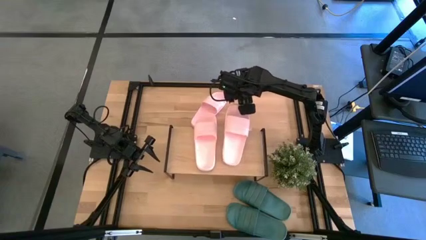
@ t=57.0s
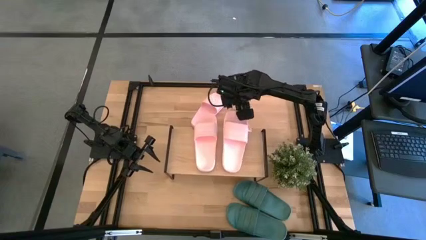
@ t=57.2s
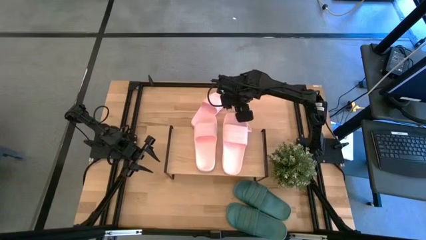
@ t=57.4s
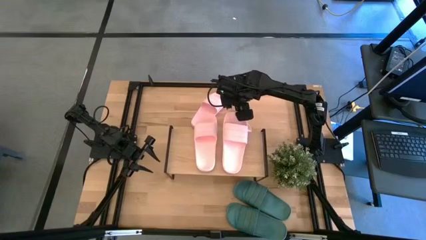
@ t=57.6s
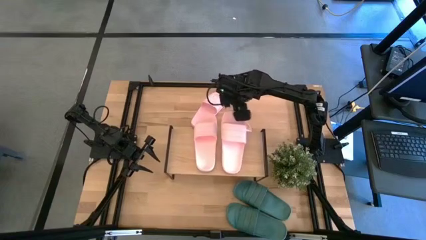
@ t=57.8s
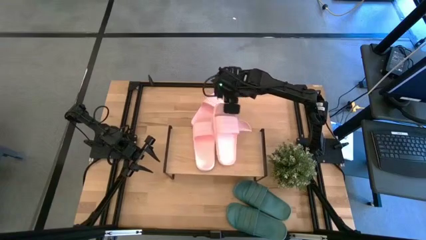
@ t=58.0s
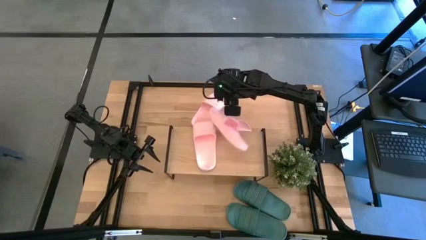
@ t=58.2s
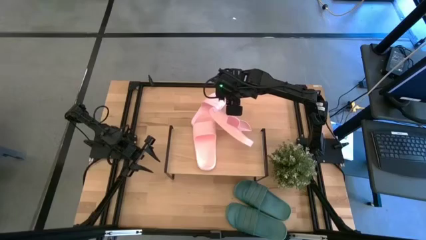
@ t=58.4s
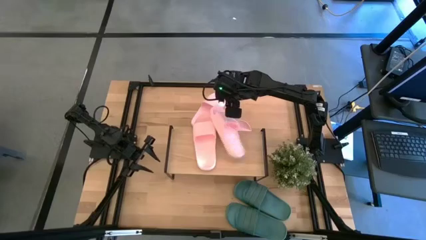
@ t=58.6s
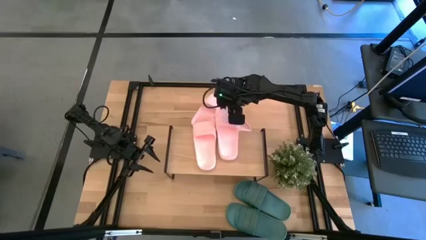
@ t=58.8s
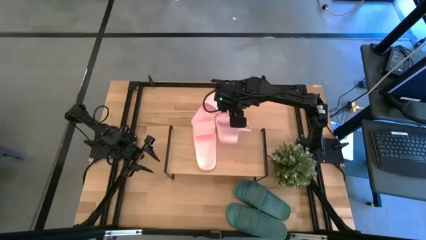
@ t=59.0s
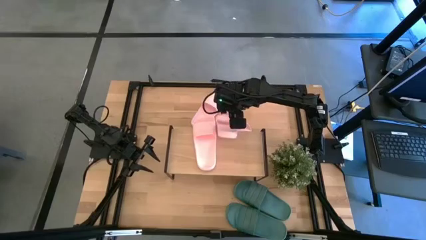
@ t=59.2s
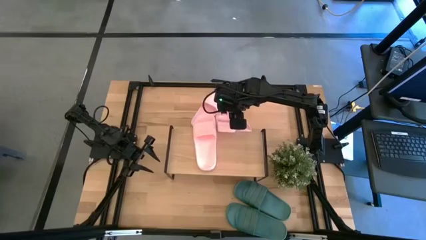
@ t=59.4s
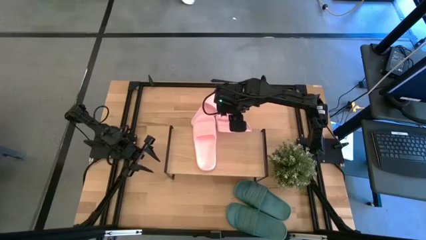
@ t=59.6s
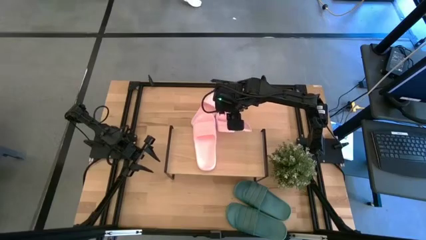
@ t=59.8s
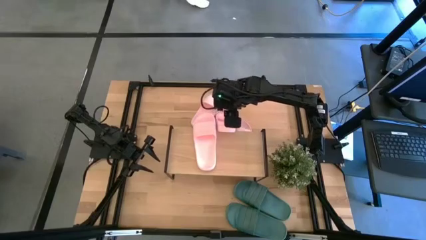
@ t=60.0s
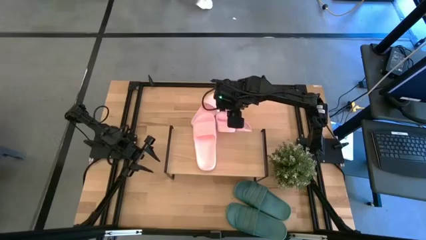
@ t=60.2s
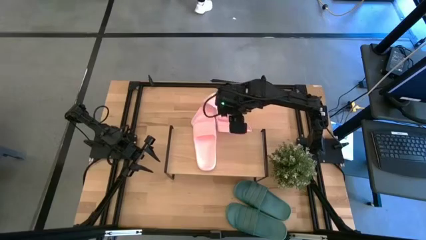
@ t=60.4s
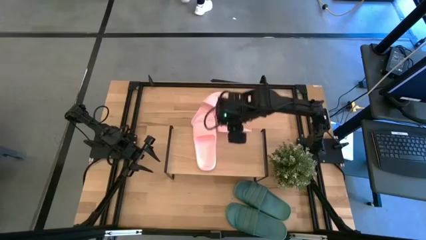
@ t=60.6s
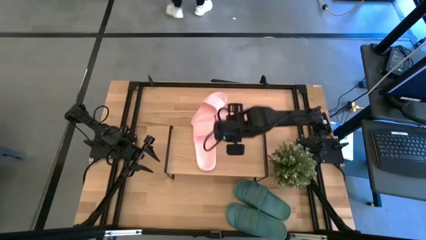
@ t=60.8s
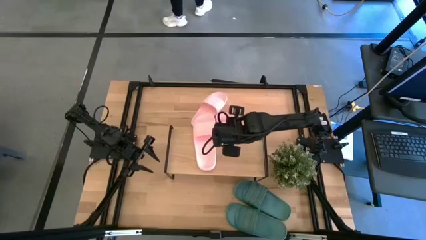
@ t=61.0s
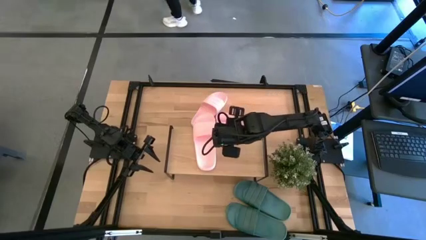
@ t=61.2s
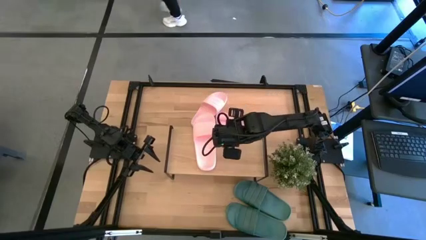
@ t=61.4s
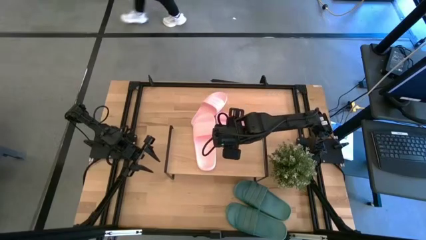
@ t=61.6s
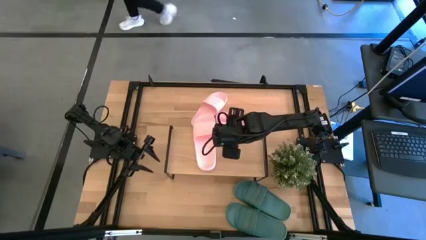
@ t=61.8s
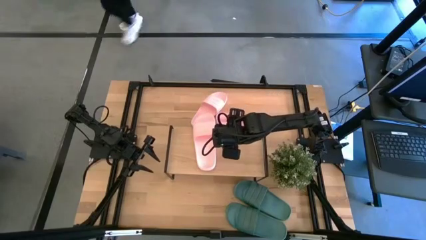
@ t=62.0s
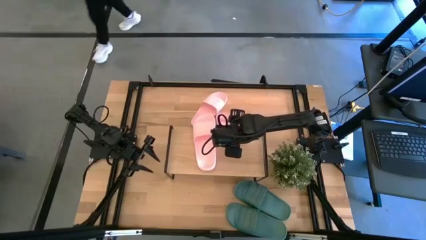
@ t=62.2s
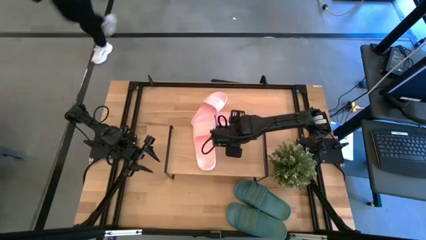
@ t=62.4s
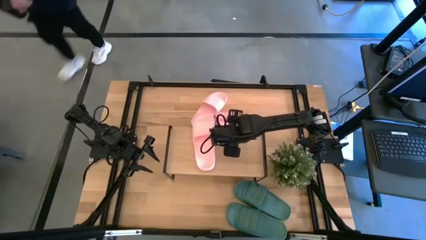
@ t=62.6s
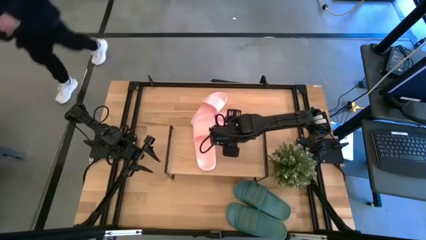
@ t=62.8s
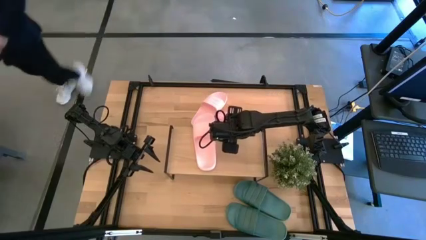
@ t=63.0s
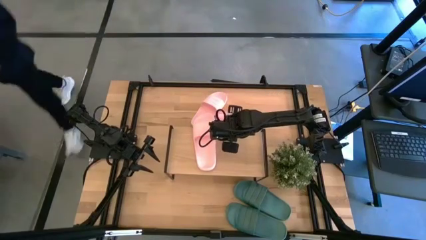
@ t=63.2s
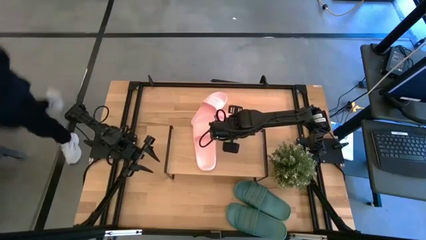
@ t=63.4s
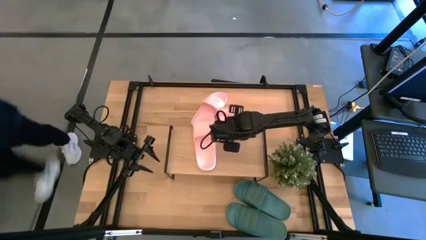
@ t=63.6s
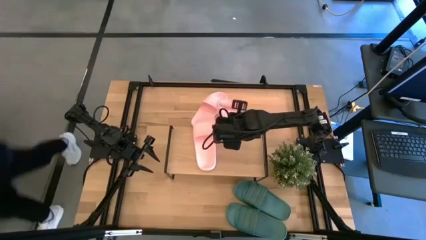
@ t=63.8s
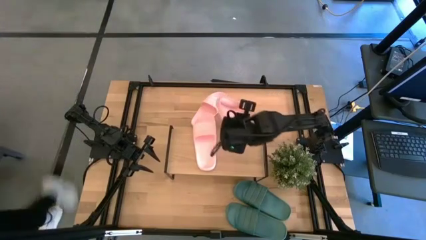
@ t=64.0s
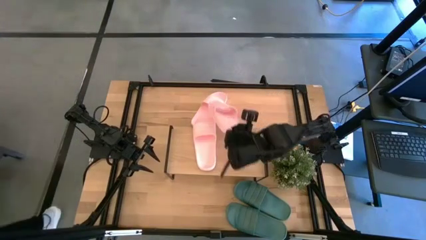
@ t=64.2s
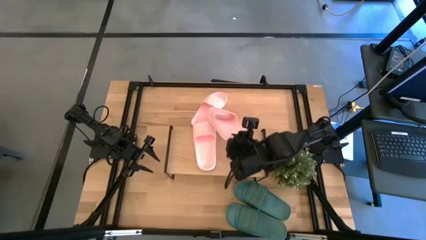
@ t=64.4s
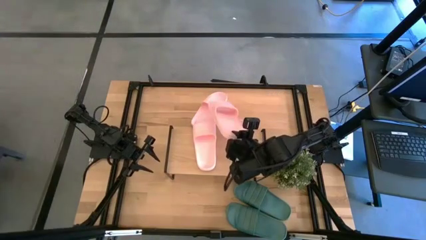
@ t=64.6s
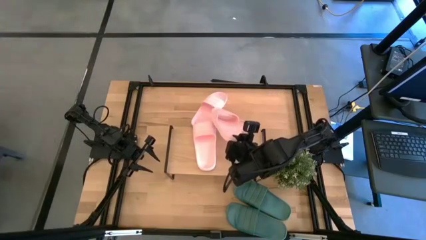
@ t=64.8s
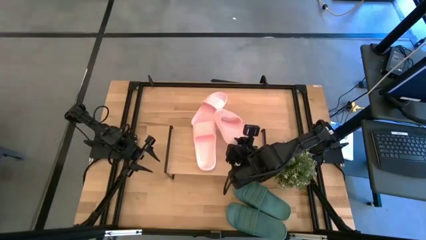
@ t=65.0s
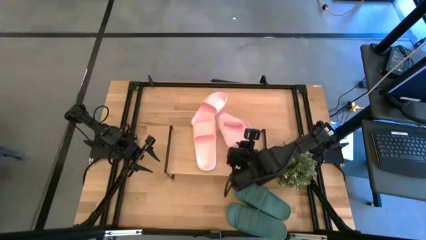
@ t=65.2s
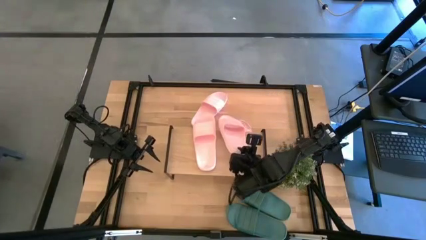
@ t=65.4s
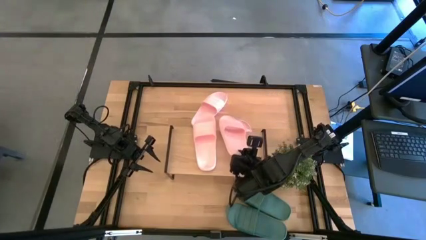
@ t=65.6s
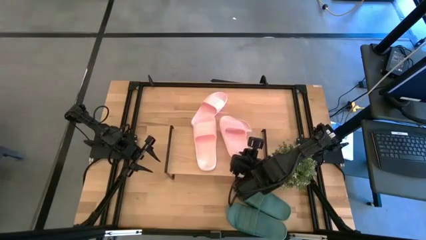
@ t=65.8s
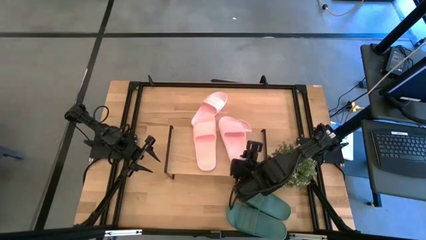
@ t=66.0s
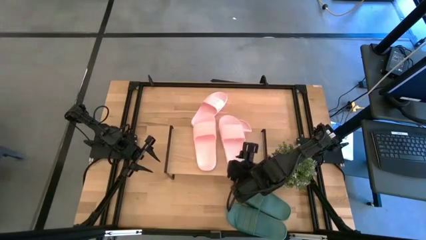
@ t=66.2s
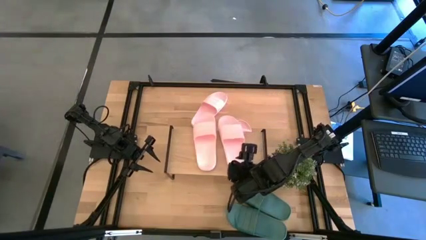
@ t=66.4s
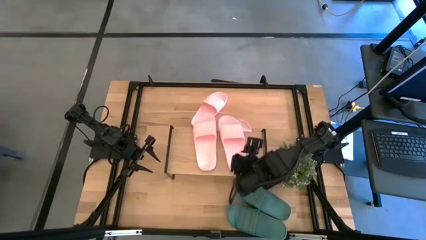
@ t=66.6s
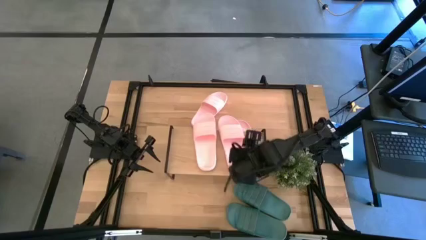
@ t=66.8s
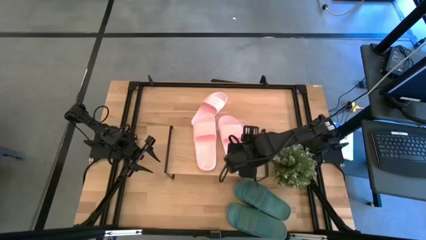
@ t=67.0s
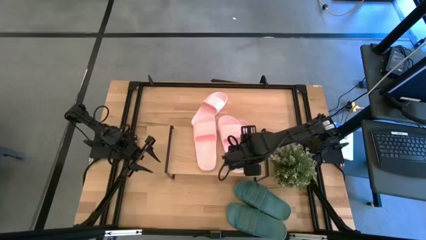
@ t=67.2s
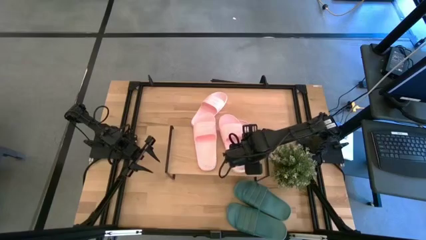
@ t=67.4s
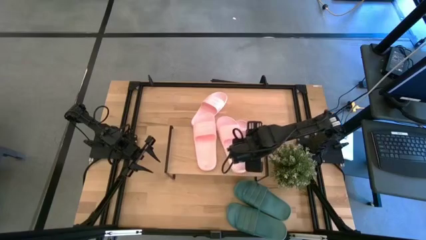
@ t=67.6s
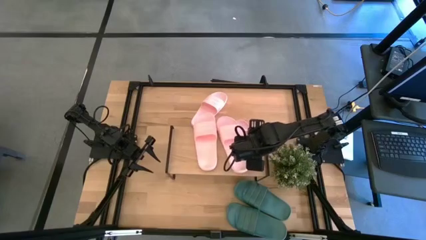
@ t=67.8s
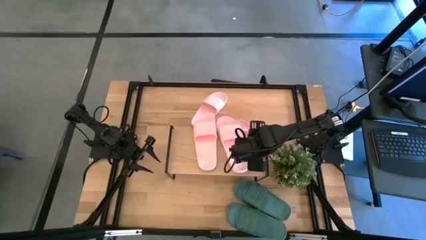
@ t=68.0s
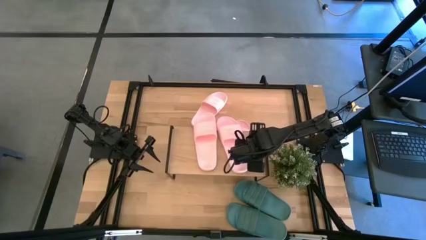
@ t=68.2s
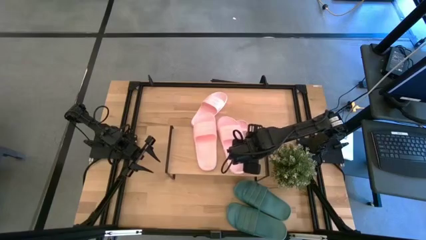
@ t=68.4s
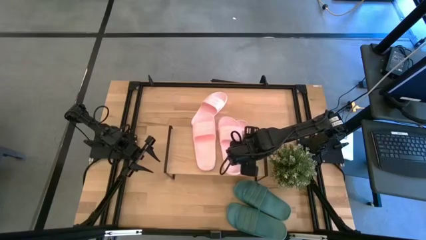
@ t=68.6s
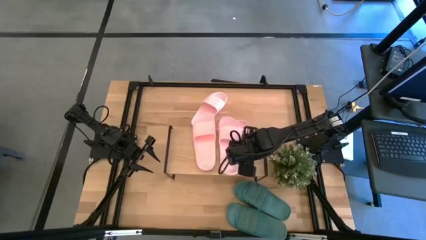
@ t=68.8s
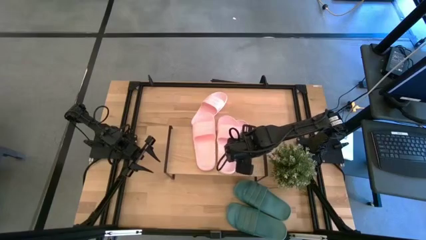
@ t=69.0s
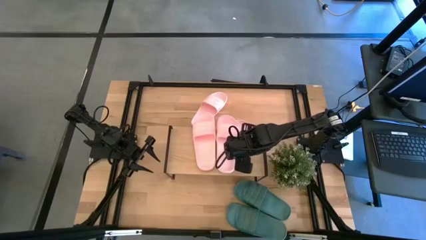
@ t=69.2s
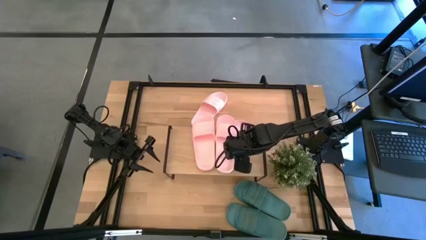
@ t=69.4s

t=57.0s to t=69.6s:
Task: Pick and place slides into the shelf
Adjust the pink slipper on the shelf

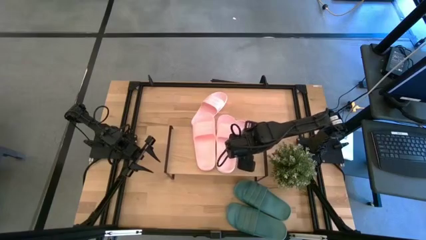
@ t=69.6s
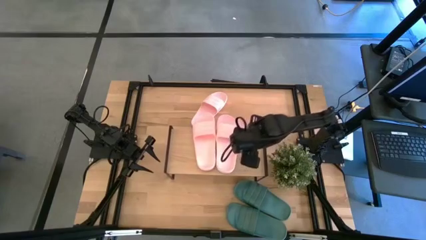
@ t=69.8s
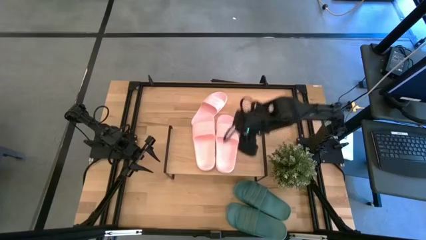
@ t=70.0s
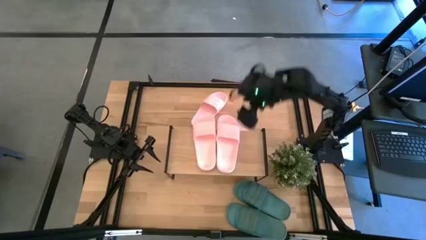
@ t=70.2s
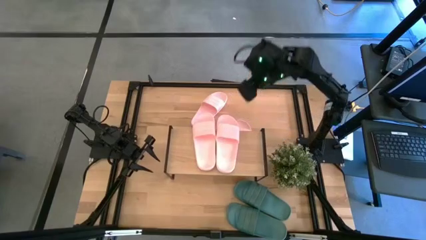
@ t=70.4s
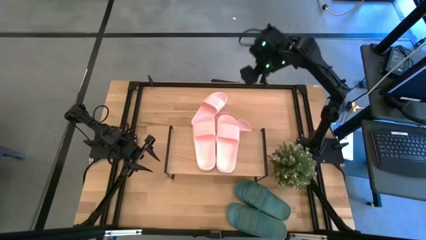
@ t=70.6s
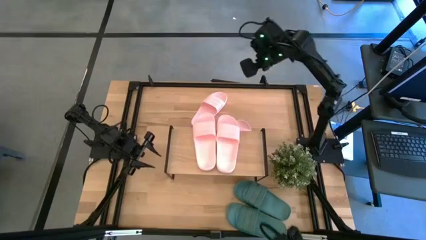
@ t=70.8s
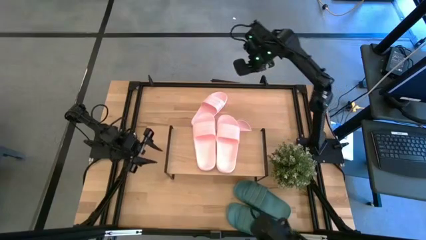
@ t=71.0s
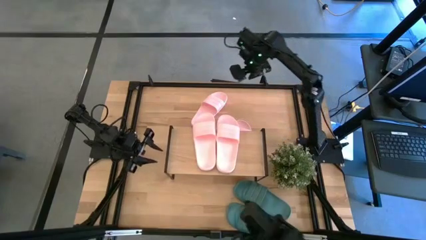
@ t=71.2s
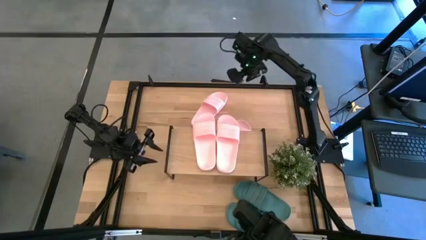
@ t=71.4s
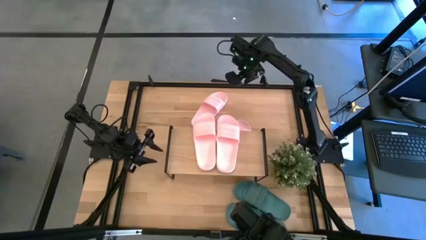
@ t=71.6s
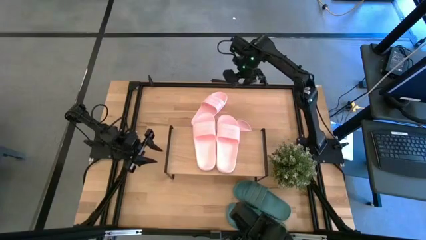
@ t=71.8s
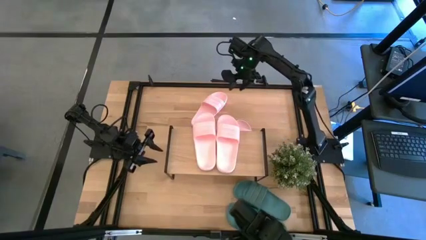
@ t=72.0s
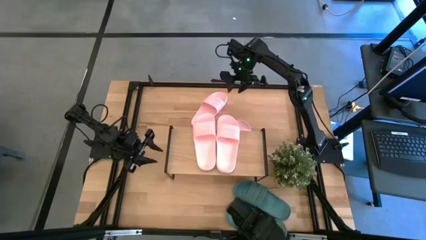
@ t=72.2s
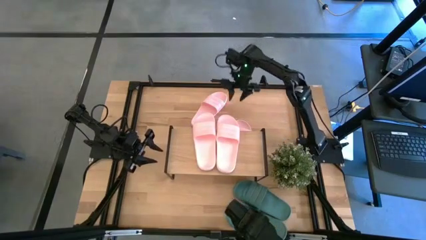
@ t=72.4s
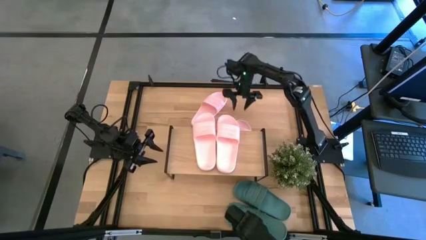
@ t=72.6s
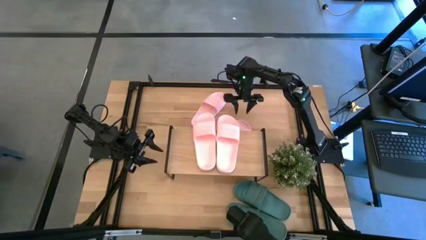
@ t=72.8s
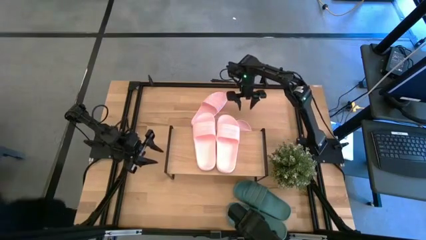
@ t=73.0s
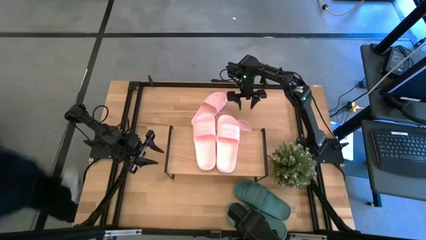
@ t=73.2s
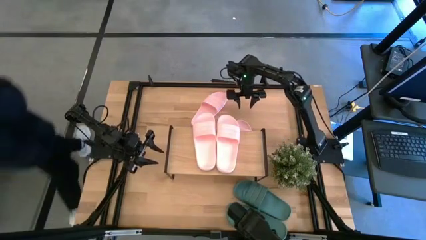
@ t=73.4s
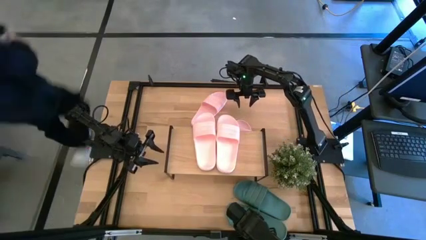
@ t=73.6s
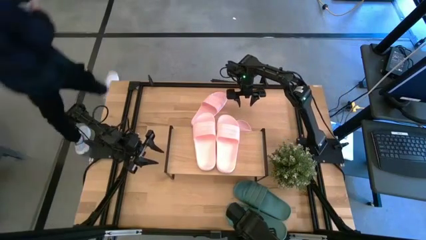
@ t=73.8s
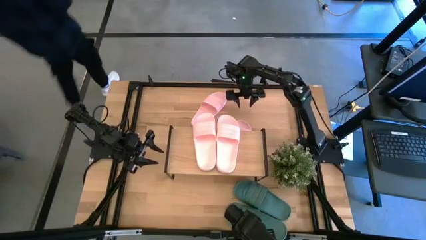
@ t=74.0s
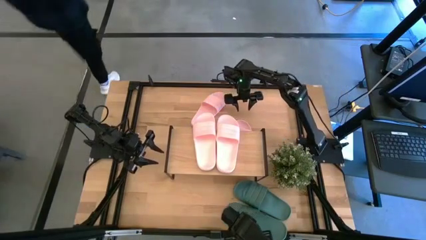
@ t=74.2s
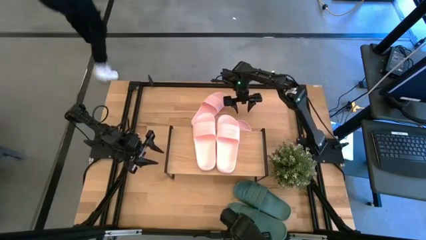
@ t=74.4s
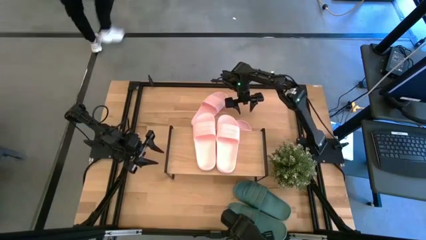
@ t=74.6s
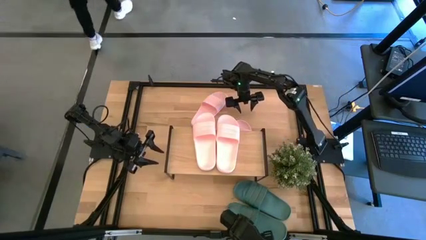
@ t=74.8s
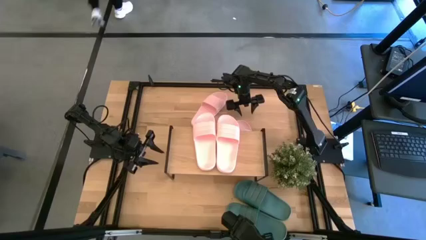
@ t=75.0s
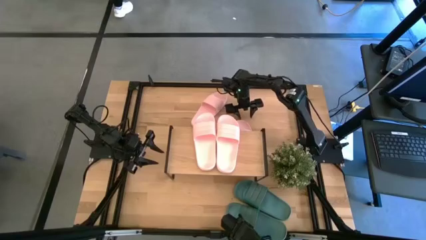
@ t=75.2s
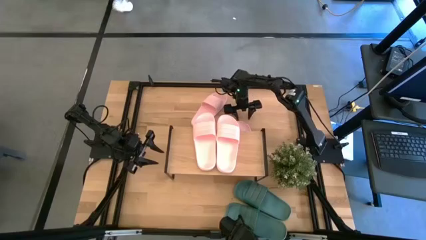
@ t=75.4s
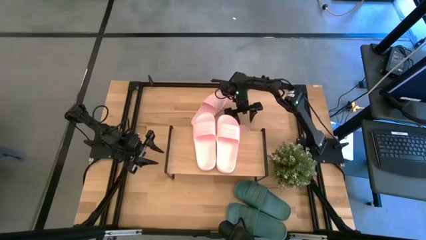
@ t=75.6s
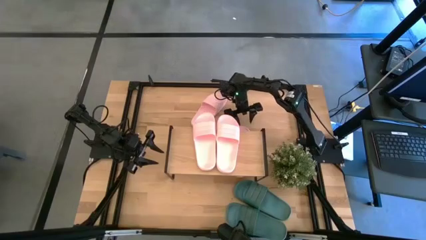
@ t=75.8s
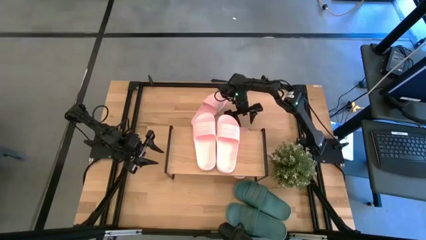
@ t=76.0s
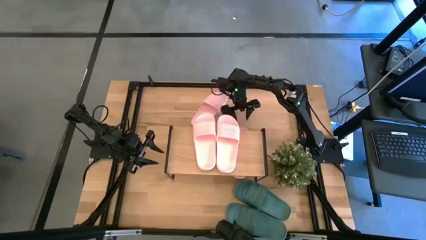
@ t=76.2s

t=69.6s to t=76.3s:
Adjust the pink slipper under the shelf
